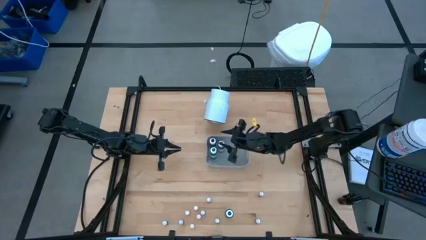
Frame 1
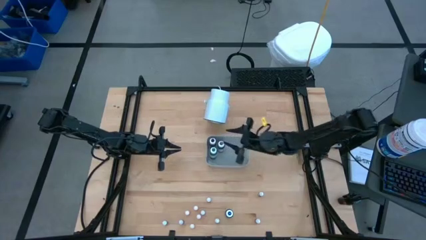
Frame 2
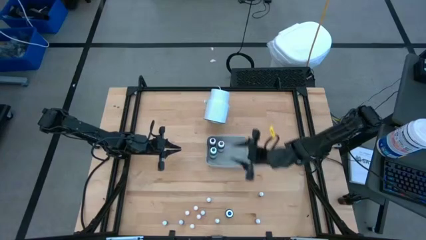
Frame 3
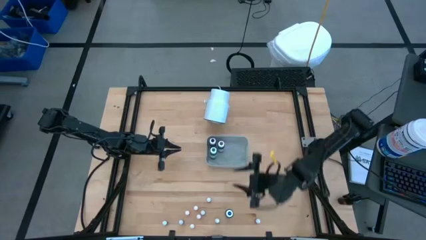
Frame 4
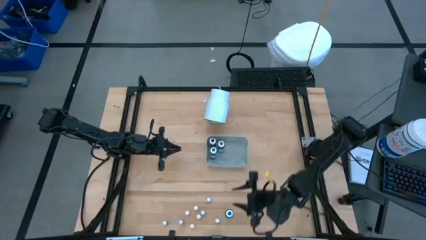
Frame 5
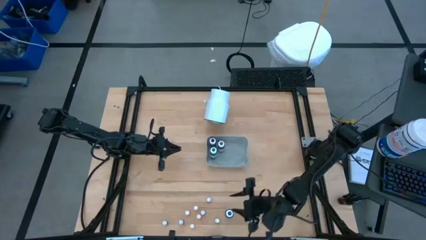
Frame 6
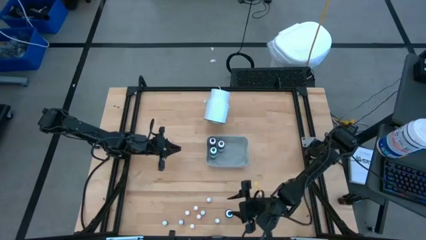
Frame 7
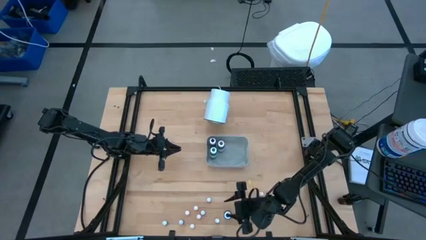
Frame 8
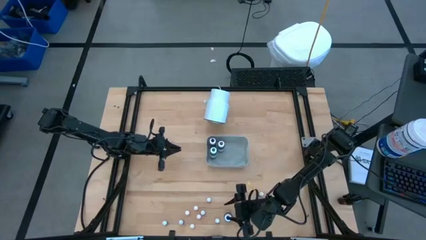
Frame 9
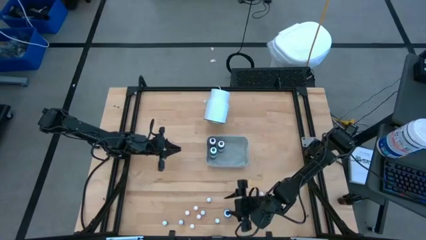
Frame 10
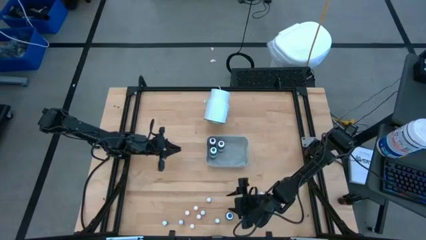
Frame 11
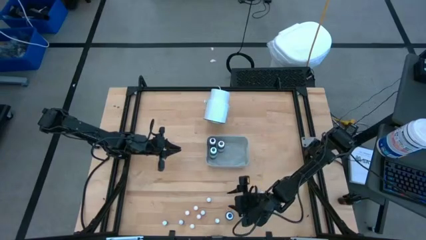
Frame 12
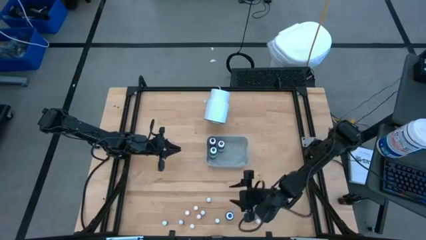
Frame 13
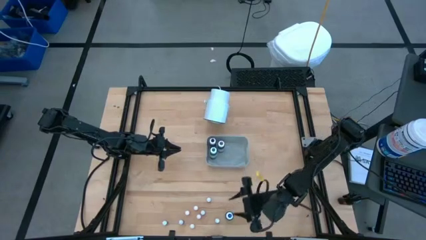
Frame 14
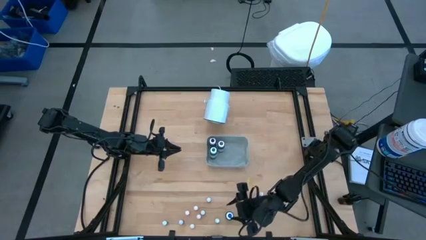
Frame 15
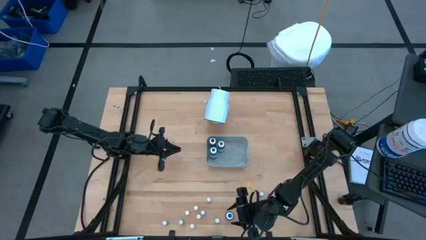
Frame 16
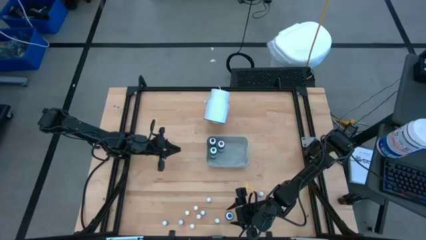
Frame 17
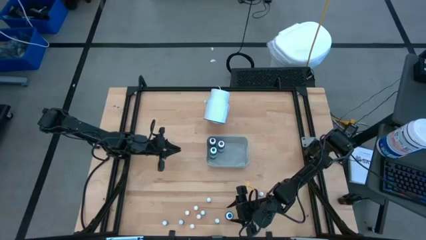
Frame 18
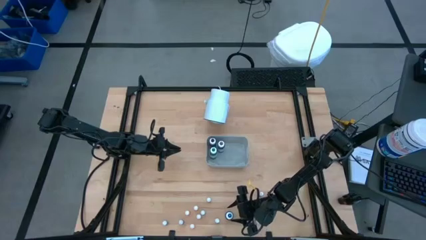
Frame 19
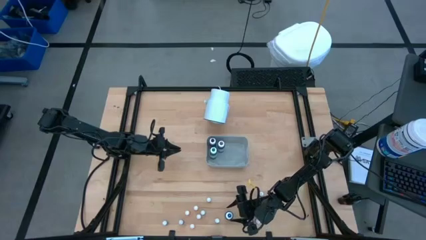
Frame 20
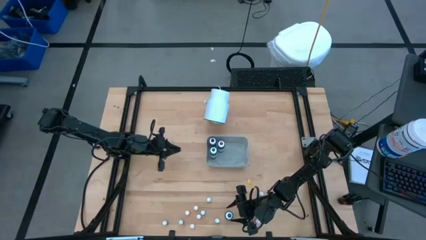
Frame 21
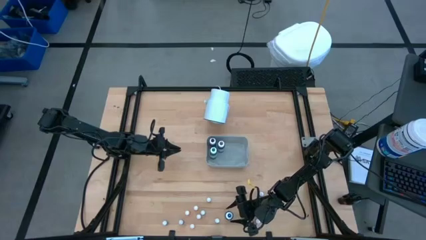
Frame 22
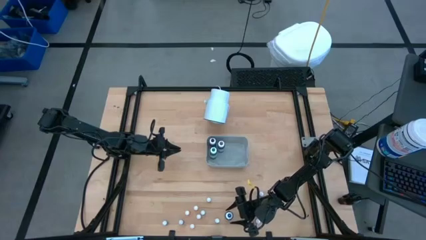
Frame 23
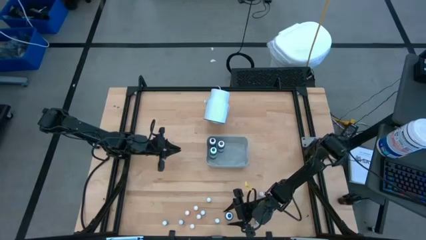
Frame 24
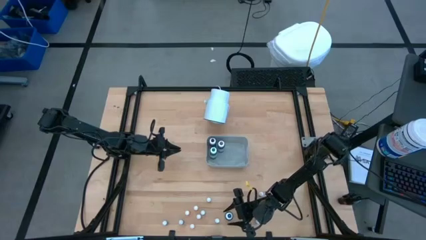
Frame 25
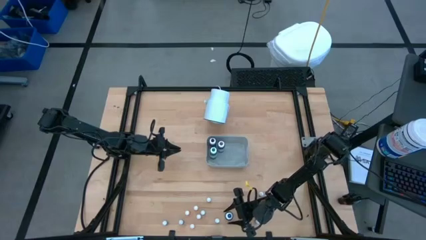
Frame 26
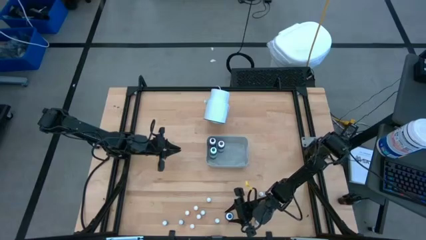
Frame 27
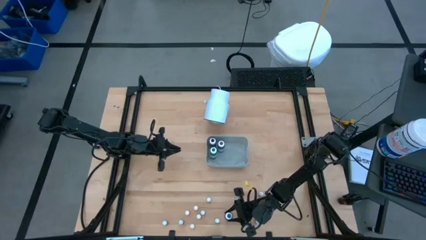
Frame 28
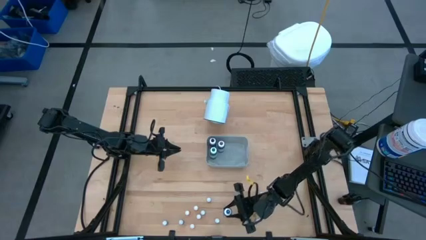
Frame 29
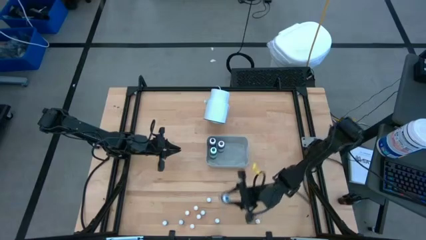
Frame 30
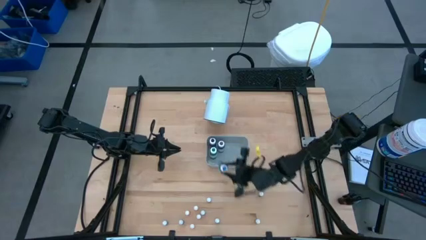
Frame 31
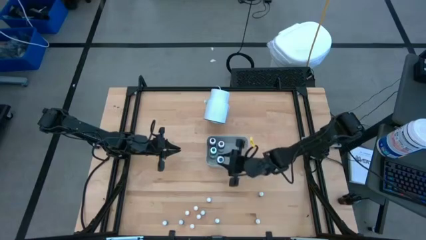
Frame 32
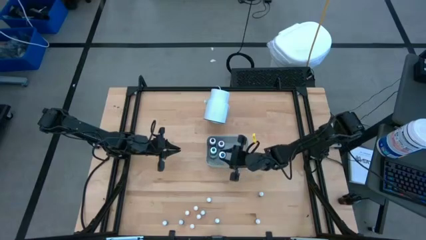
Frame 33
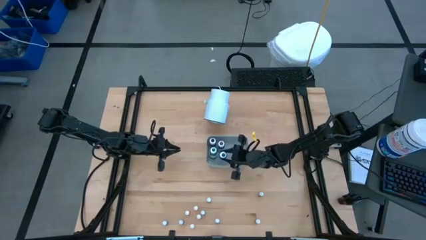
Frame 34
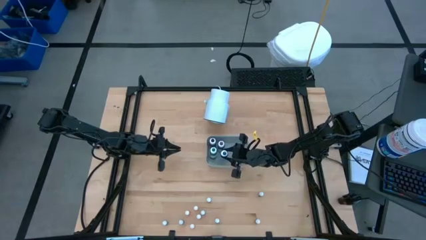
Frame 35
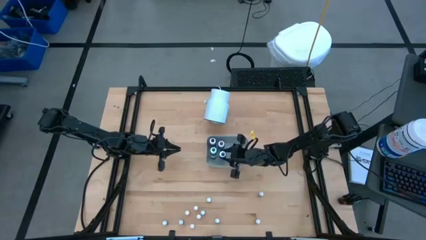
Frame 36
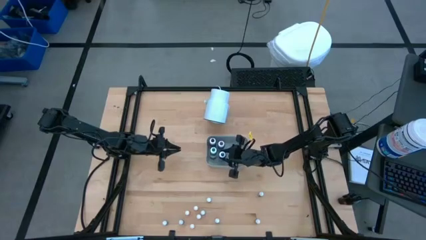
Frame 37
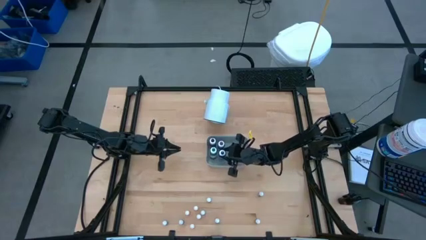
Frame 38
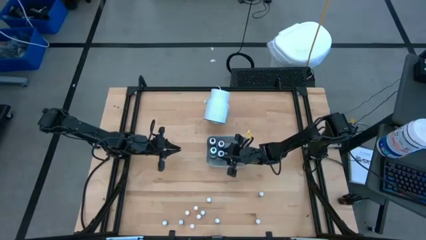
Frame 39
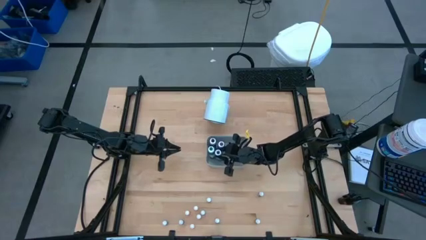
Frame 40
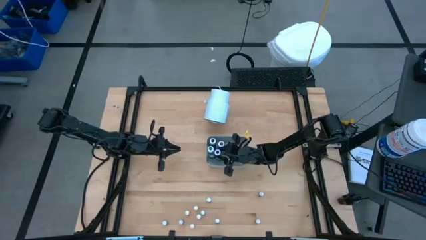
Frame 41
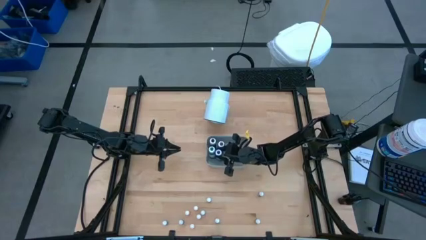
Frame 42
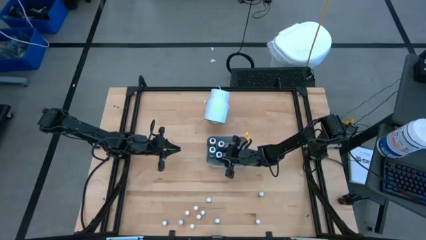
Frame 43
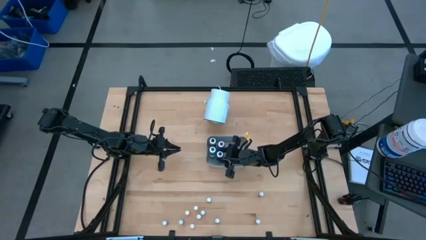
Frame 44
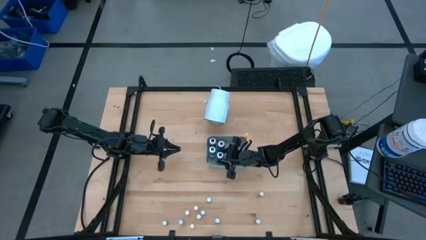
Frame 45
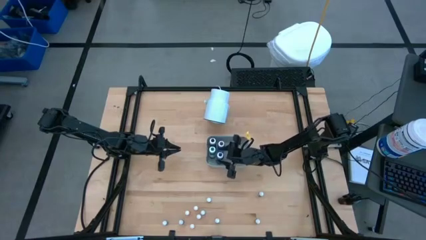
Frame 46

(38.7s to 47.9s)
Task: Pick & Place food coloring
Put the large blue food coloring bottle into the gray bin

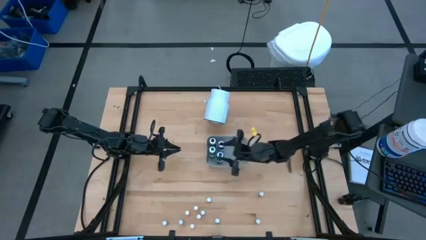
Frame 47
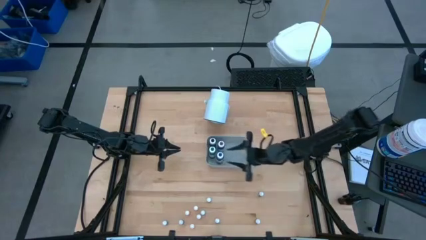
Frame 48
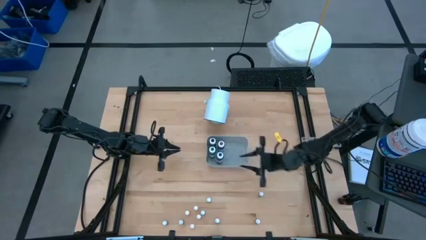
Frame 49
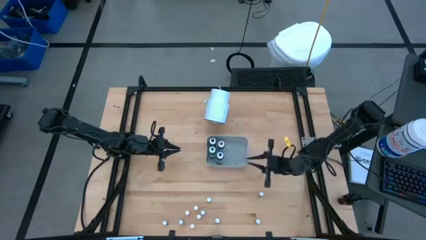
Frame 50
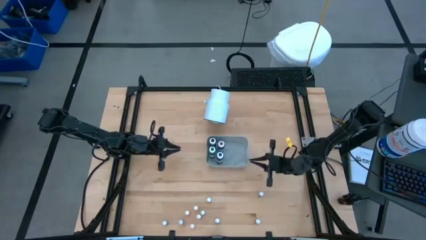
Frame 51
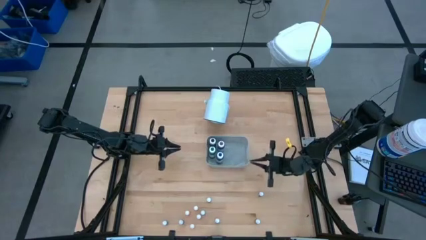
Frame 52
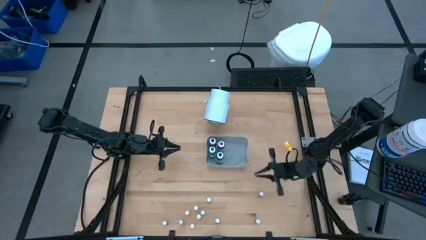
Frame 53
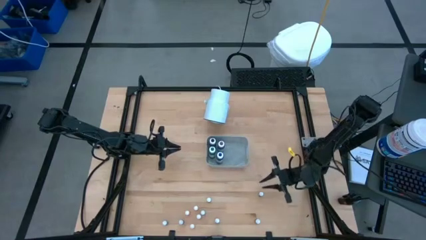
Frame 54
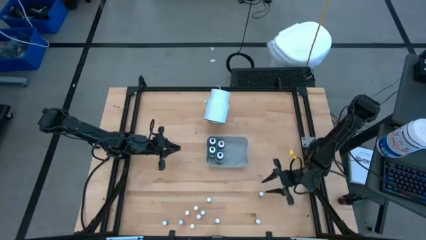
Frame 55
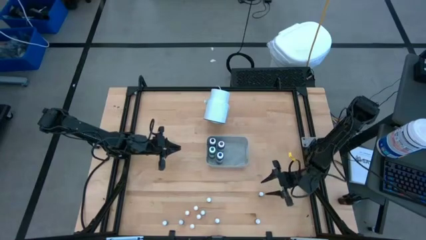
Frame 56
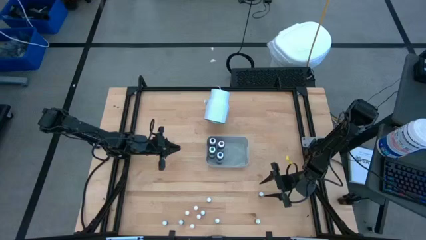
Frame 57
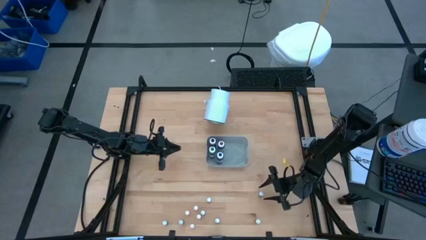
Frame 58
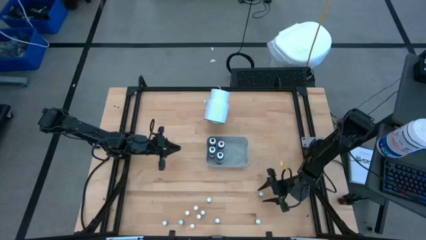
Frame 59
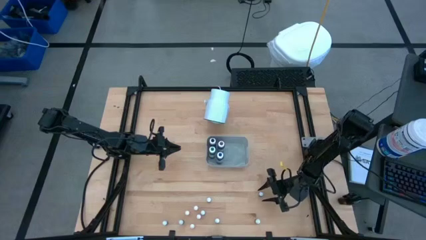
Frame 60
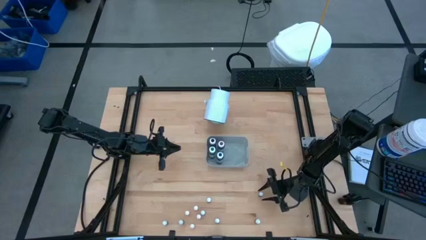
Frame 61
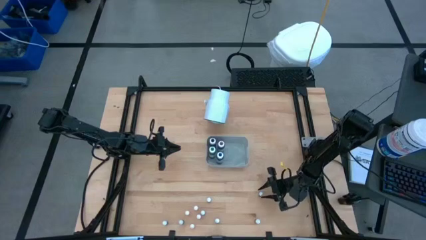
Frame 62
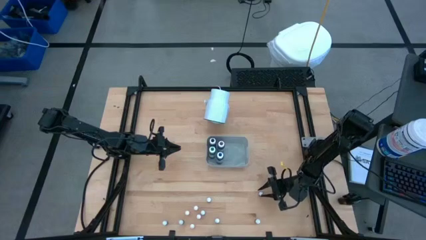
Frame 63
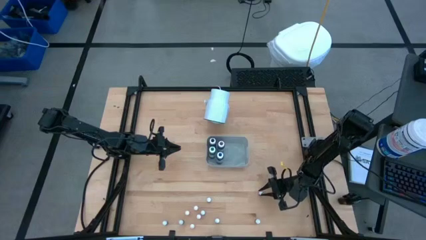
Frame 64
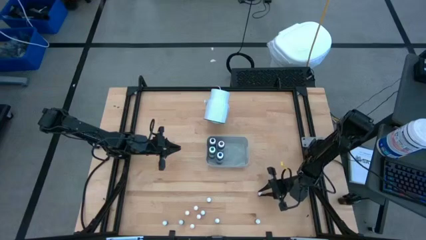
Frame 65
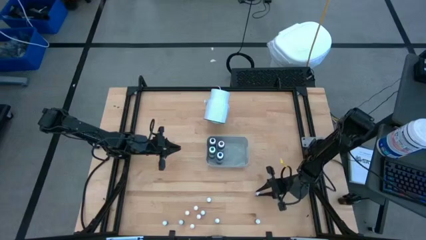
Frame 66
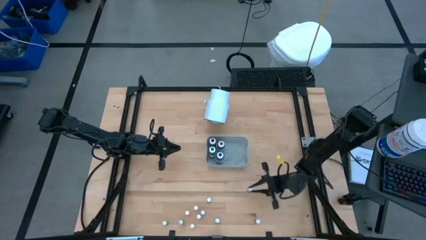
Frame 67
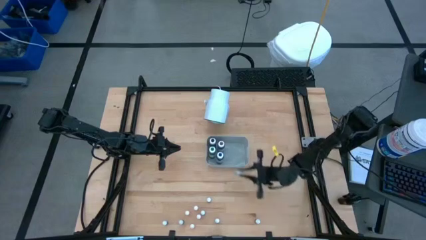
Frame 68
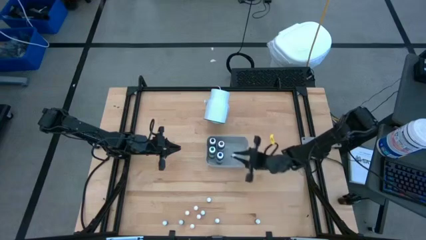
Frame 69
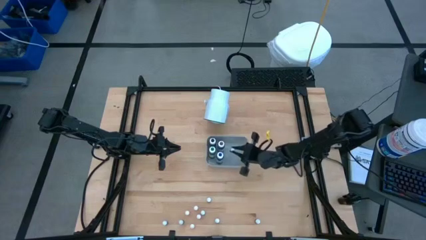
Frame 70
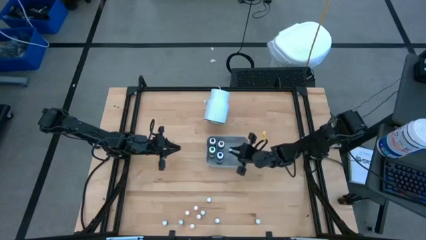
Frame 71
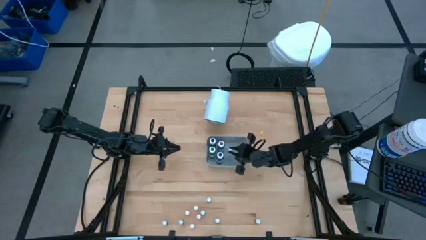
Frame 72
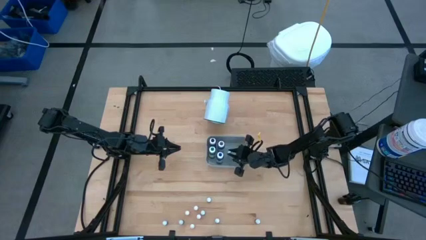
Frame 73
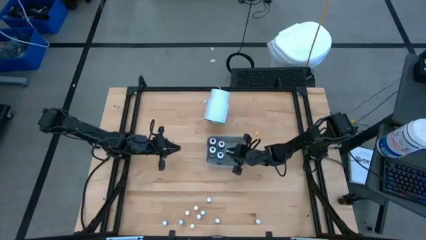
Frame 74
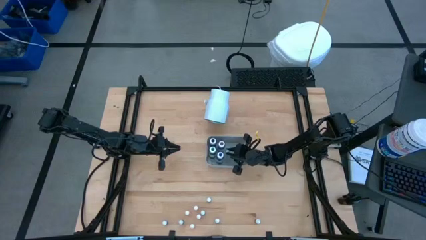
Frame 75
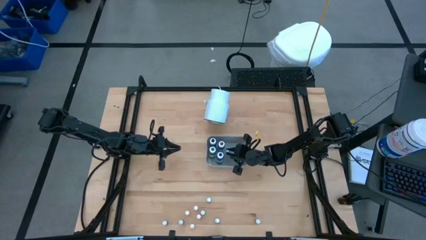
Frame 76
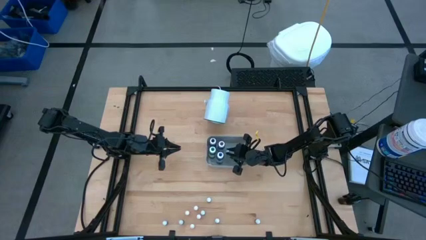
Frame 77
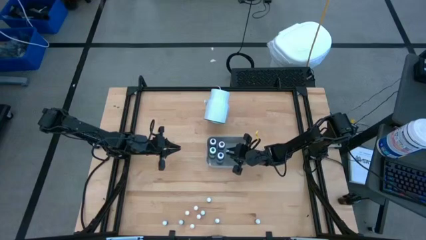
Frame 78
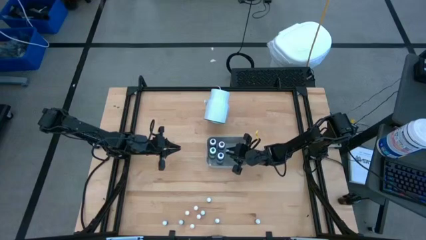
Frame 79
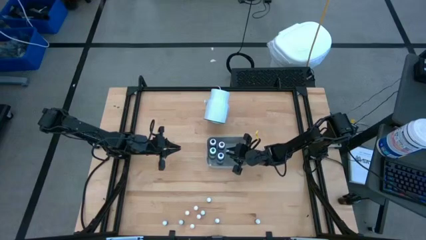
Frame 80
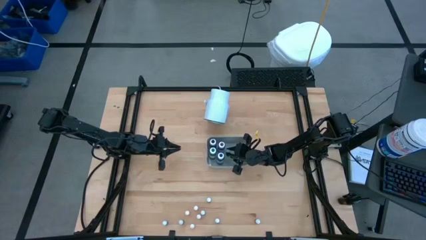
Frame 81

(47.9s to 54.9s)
Put the small black food coloring bottle into the gray bin
